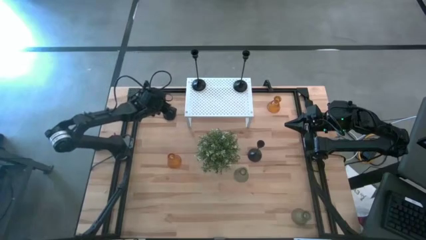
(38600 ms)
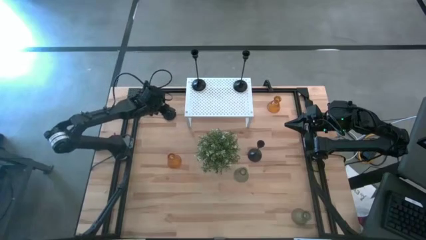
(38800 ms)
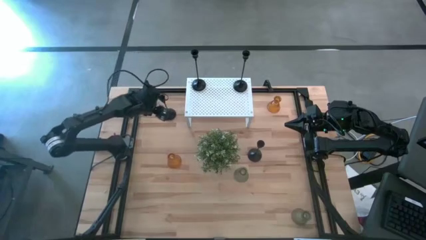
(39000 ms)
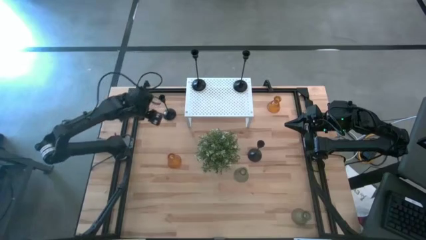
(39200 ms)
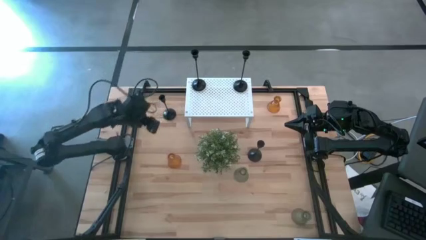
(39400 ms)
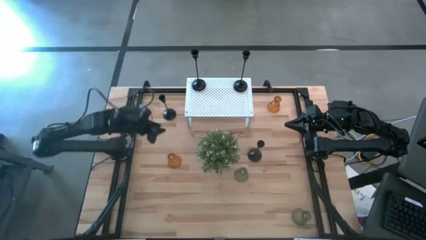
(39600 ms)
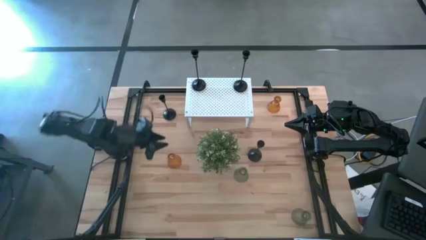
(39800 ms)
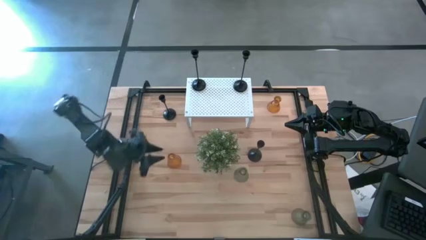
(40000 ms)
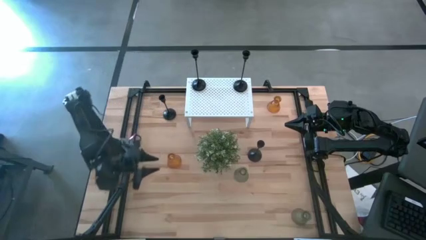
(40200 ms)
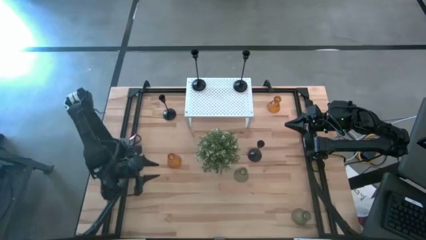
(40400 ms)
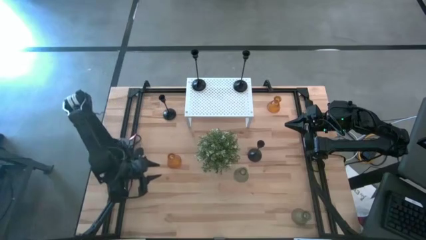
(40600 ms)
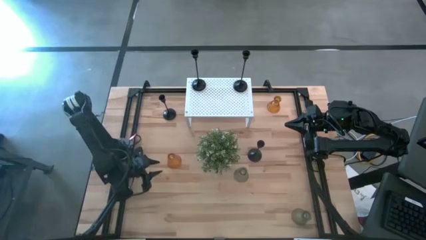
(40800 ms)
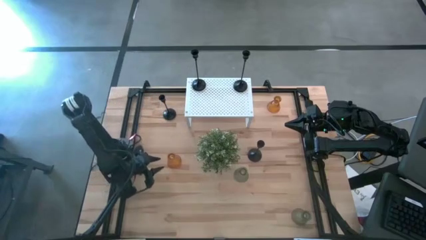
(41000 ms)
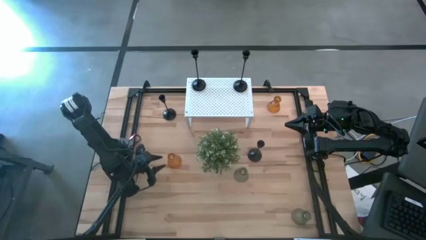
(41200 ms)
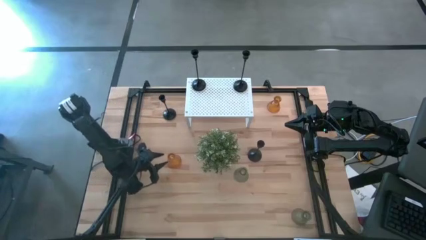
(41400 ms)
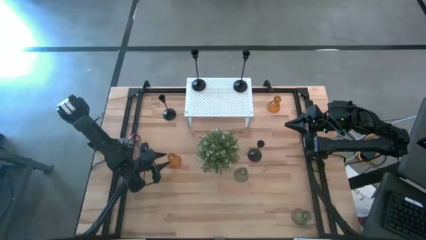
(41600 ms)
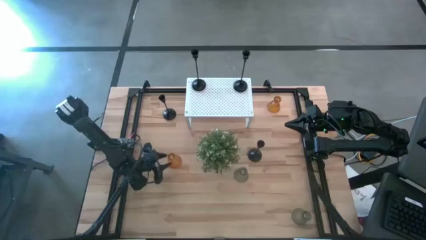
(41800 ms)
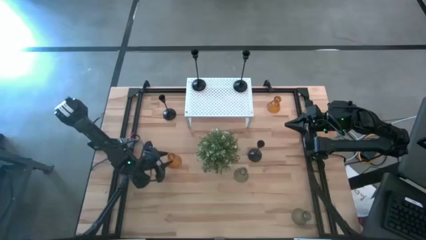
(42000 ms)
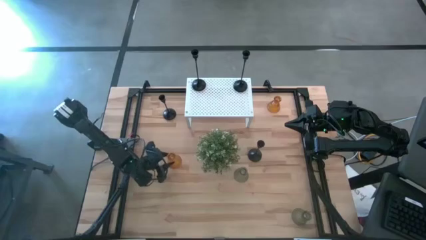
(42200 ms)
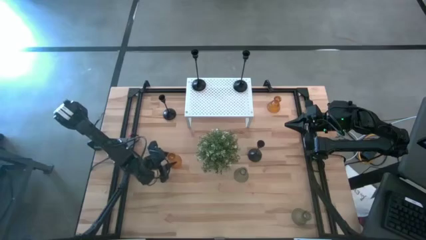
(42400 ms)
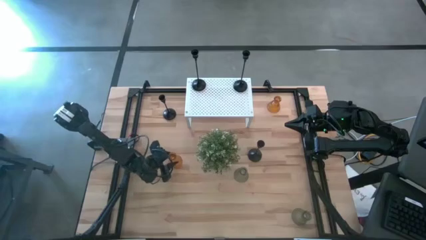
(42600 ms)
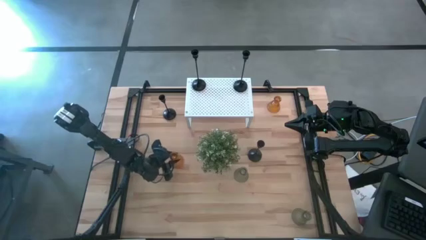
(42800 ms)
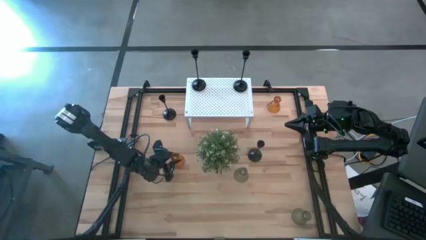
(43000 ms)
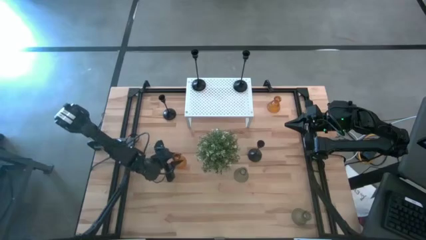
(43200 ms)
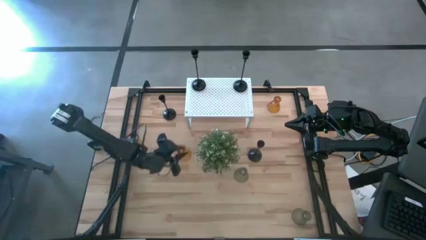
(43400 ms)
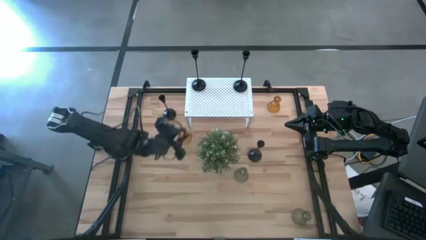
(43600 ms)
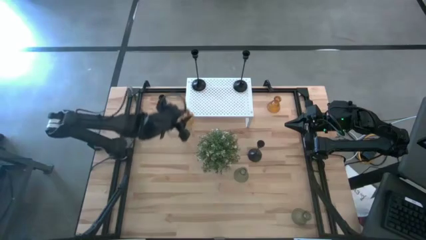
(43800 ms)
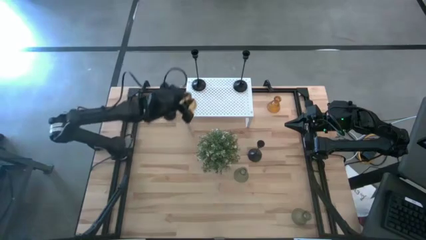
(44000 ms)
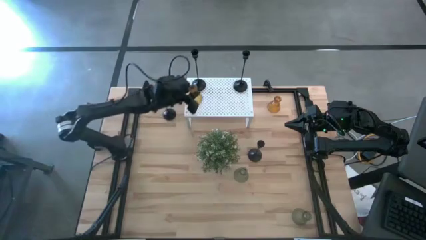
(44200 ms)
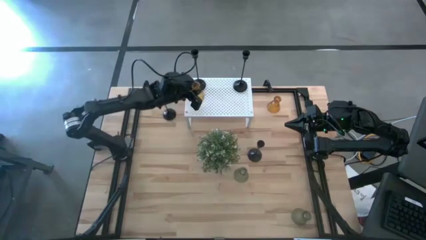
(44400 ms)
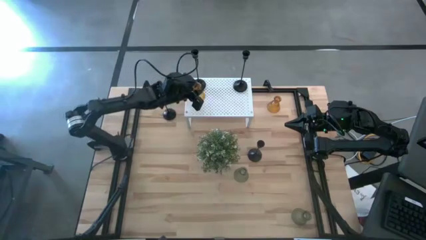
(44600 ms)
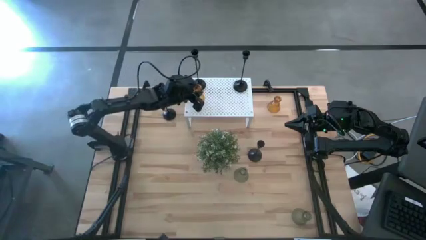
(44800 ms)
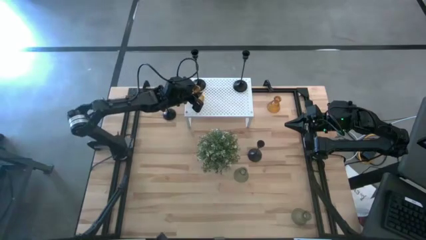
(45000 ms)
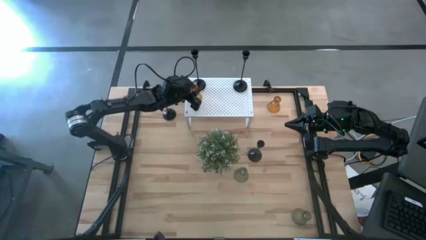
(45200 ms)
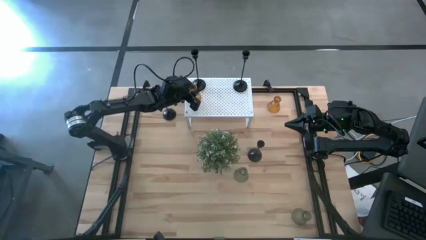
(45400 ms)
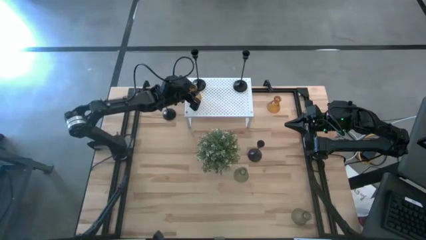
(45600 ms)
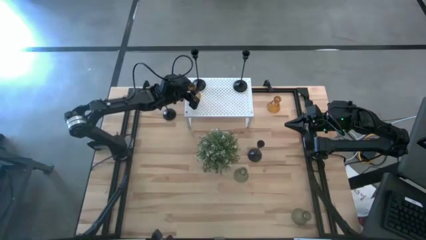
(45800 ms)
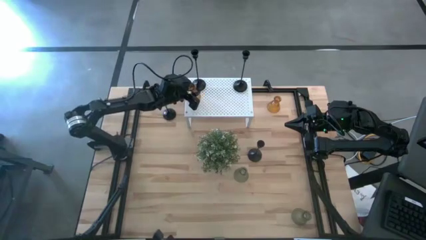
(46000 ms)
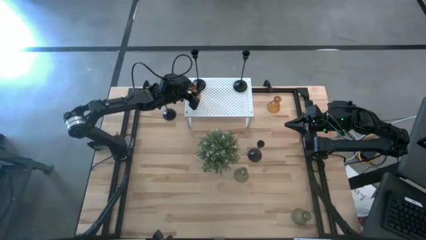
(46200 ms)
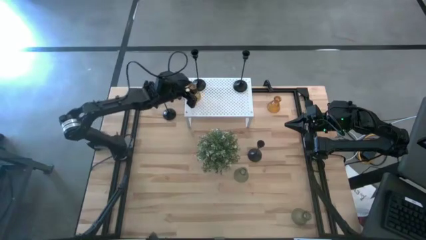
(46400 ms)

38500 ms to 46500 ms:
Task: Pick & Place candle stick holders
Put the bottom orange glass candle holder on the shelf

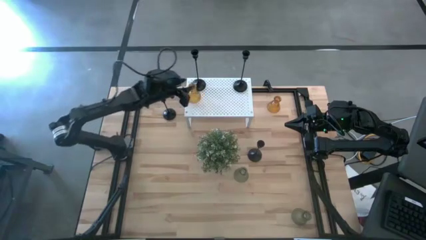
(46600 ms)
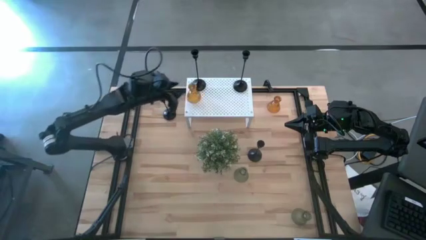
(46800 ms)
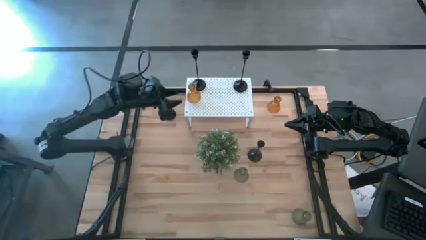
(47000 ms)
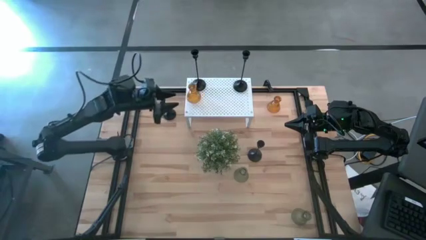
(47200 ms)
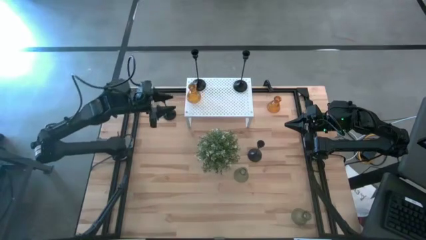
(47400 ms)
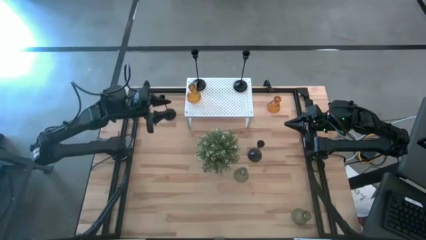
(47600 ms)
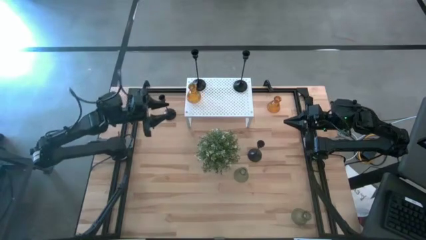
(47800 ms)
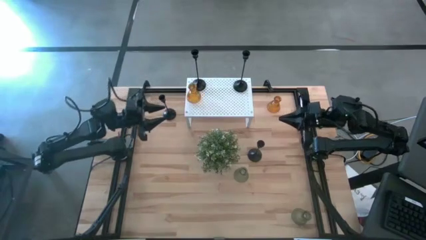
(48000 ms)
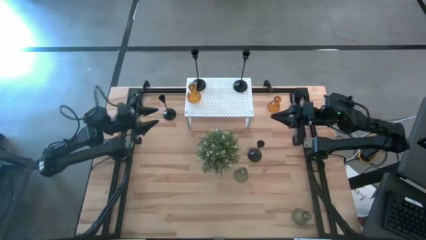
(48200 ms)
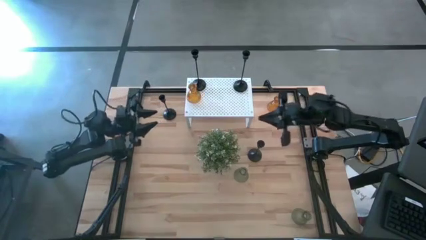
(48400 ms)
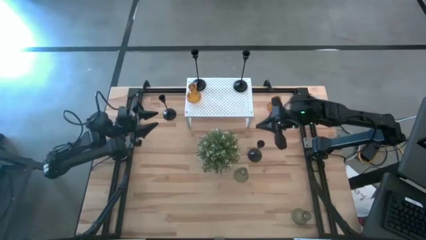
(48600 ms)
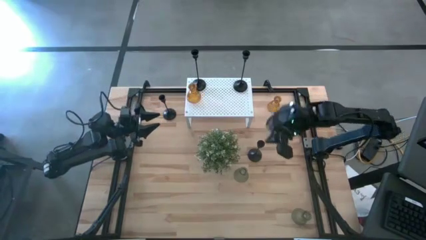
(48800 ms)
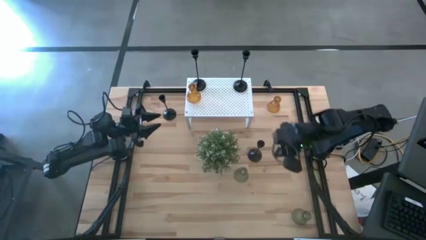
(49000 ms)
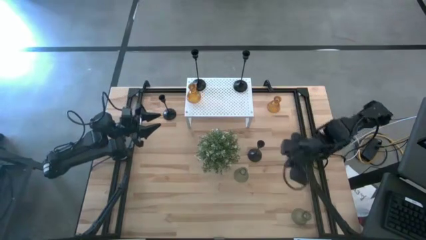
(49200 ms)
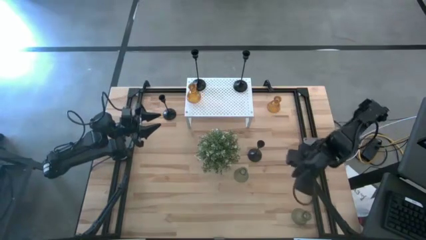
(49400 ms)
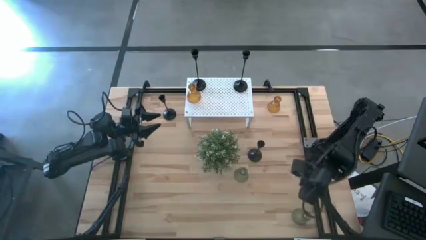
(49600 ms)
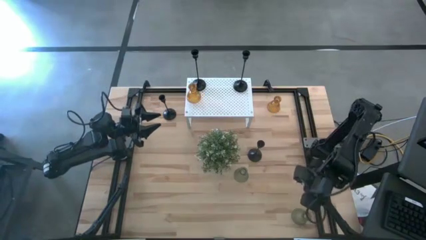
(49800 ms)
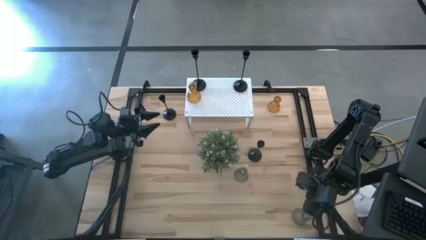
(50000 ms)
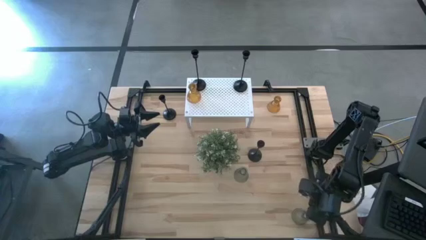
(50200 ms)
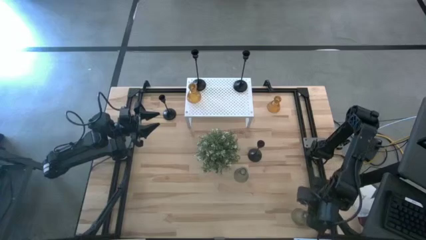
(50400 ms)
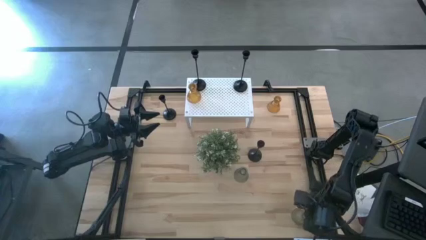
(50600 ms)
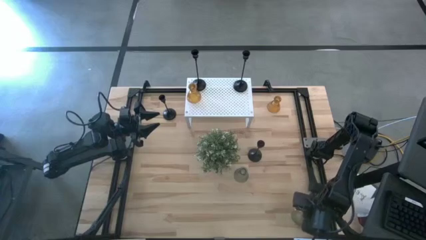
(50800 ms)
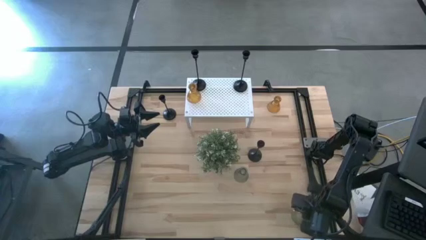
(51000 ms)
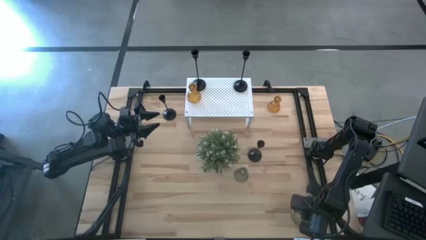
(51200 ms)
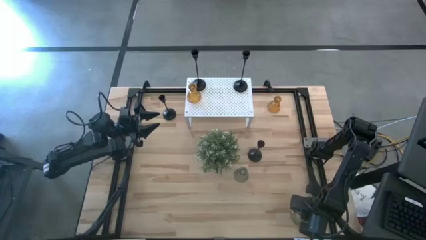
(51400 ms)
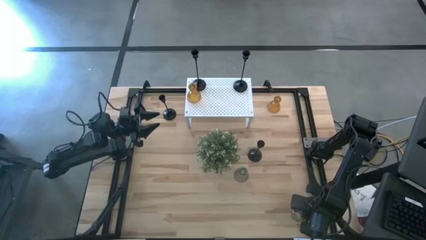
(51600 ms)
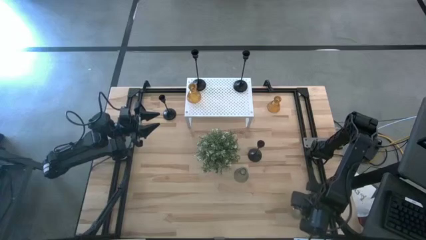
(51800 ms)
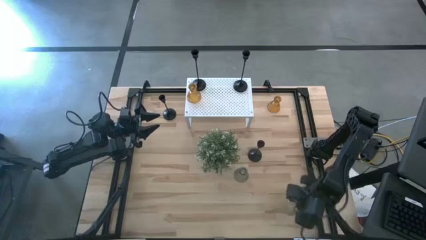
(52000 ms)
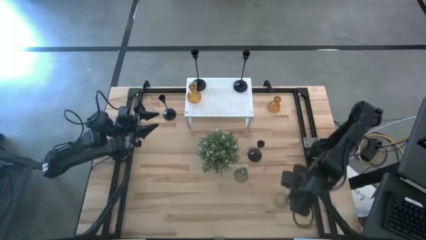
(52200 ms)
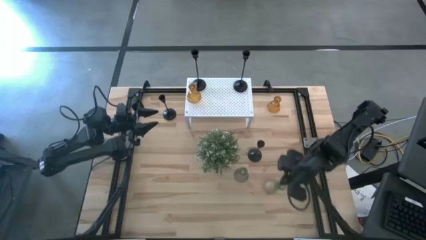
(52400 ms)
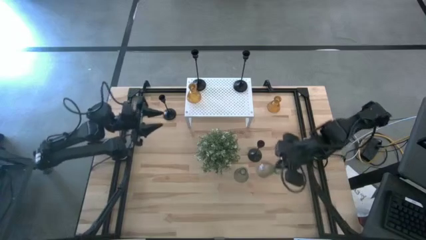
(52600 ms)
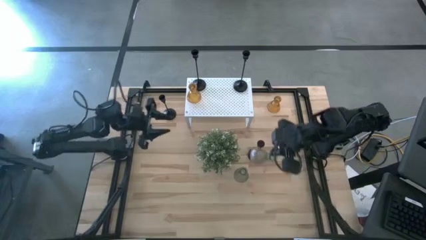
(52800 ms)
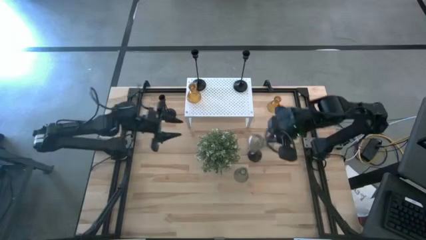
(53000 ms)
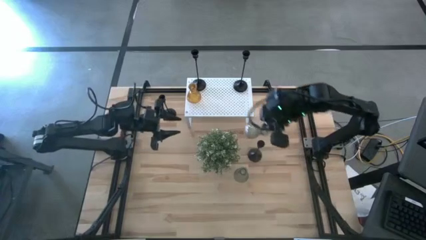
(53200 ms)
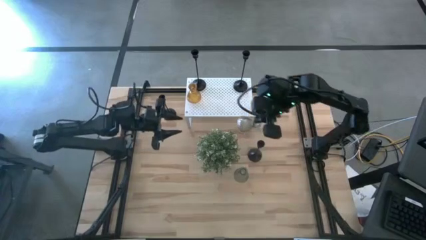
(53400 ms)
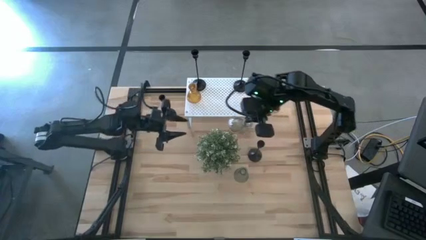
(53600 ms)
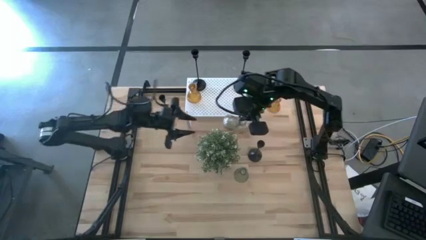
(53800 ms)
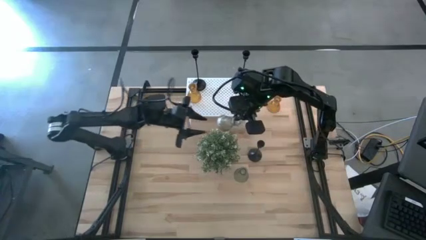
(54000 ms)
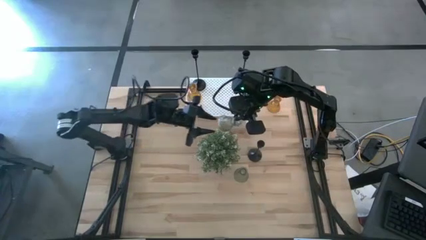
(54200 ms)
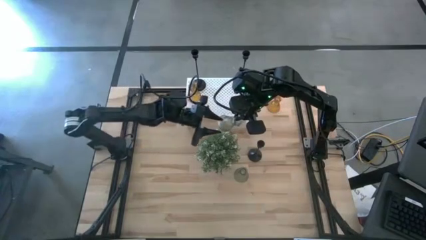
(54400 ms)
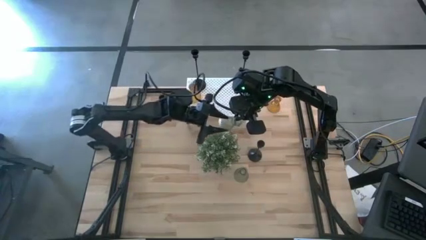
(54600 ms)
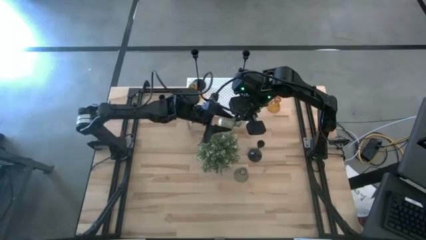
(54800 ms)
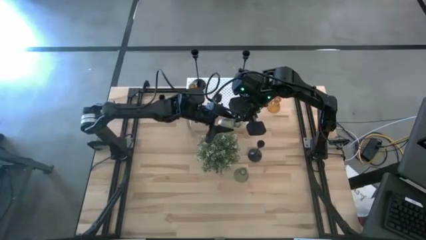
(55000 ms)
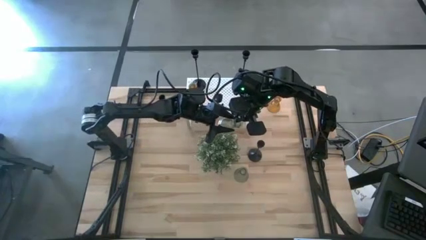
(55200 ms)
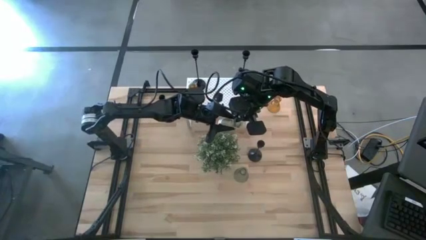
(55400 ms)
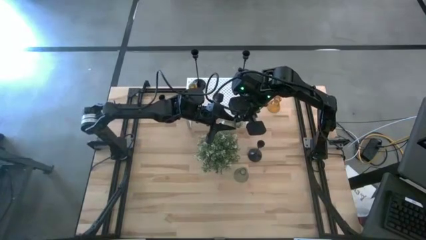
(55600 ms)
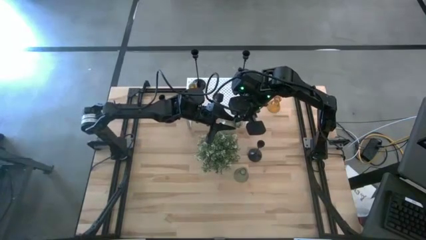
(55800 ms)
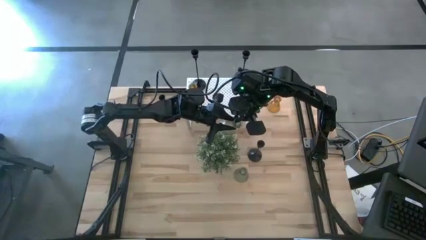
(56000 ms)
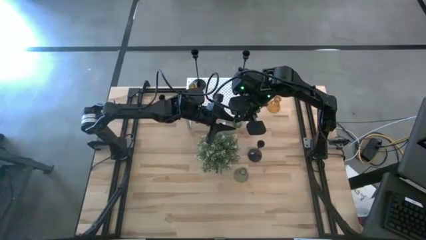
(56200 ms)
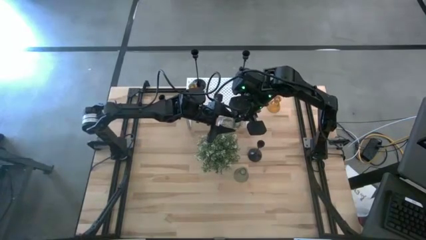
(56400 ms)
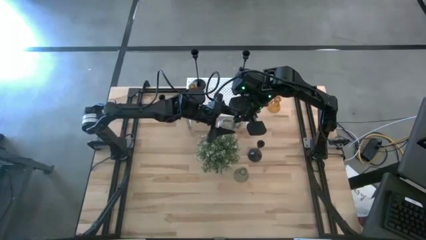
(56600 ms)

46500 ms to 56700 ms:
Put the bottom green glass candle holder on the shelf
